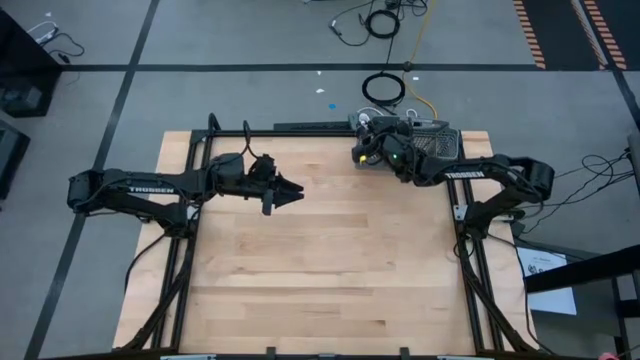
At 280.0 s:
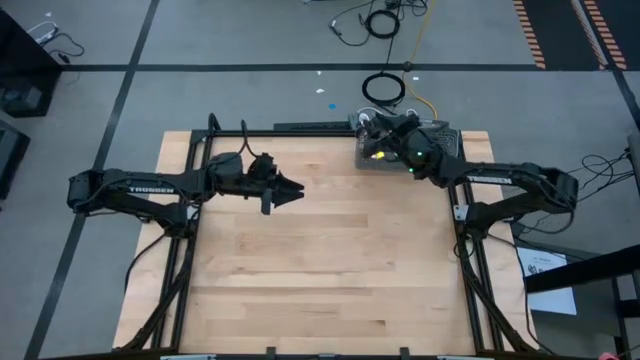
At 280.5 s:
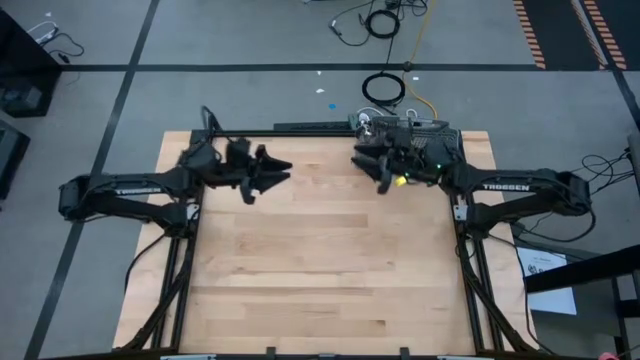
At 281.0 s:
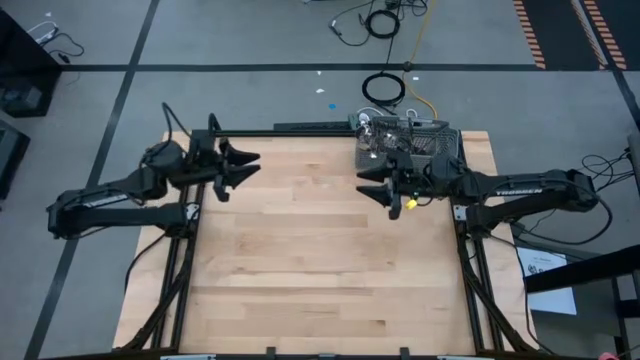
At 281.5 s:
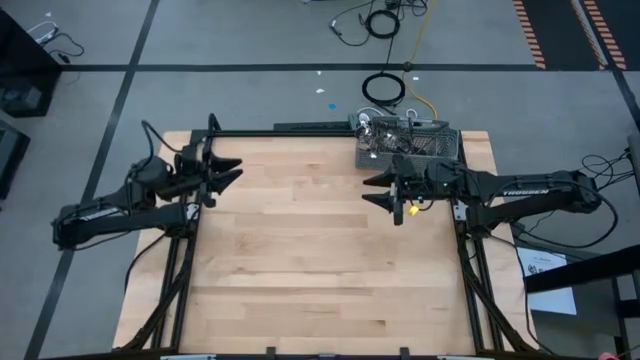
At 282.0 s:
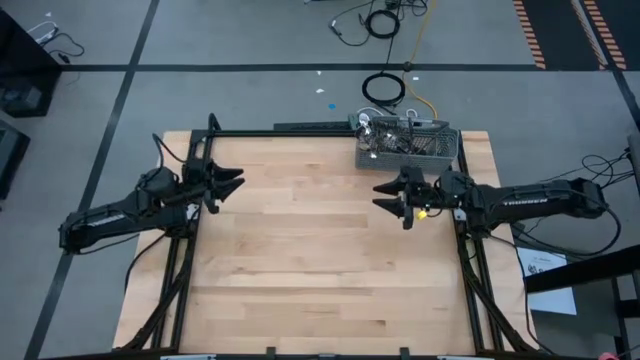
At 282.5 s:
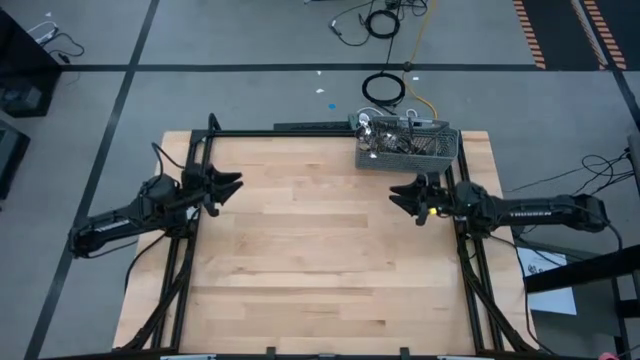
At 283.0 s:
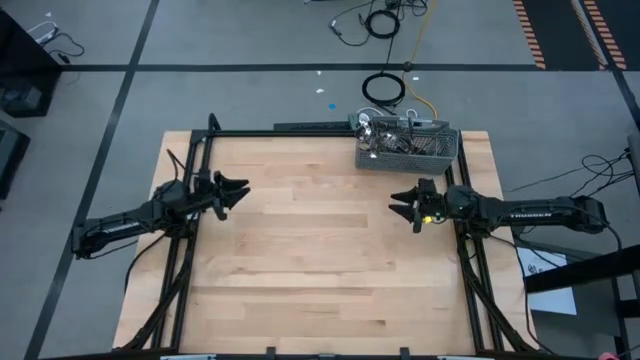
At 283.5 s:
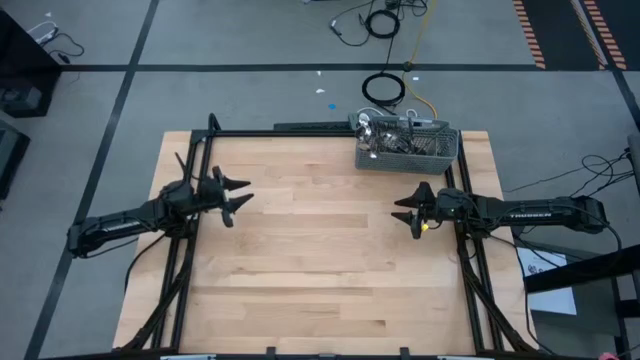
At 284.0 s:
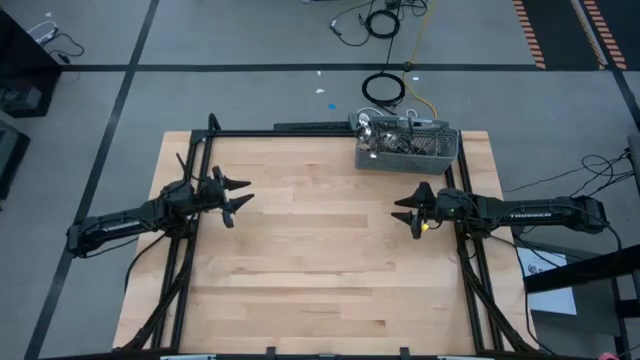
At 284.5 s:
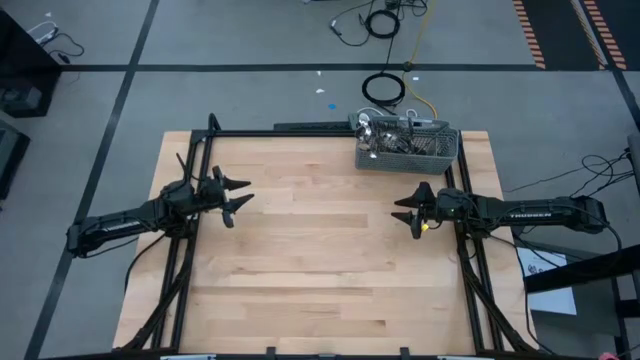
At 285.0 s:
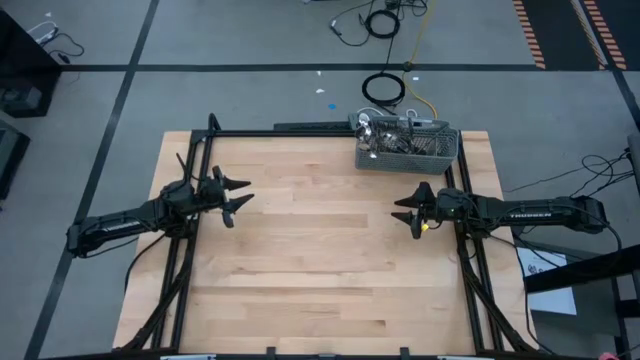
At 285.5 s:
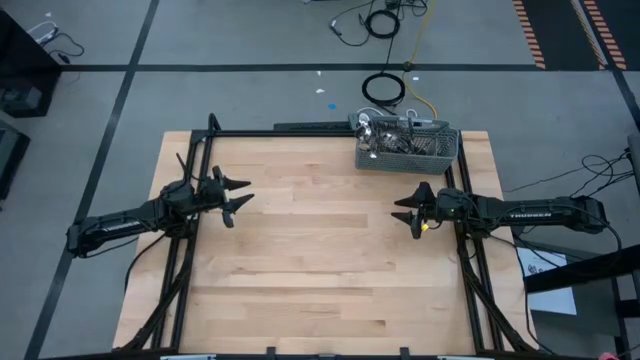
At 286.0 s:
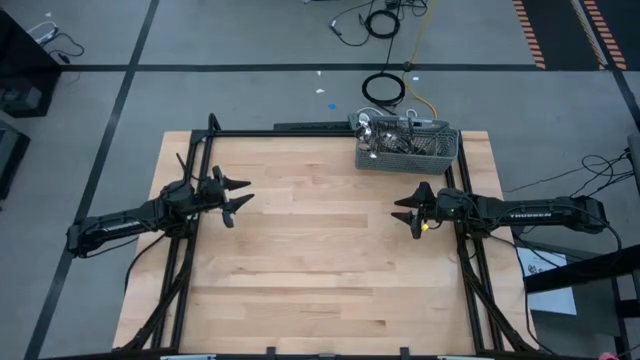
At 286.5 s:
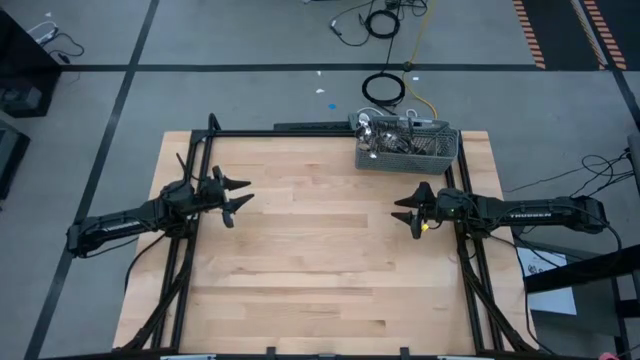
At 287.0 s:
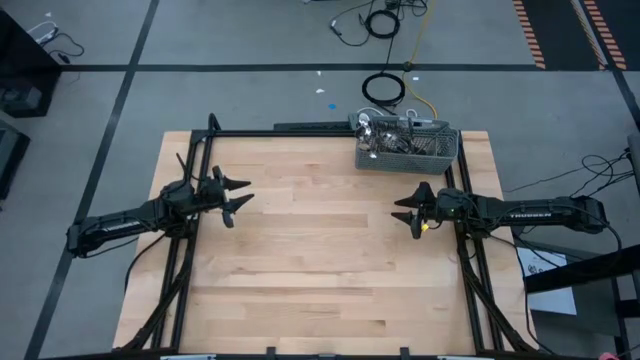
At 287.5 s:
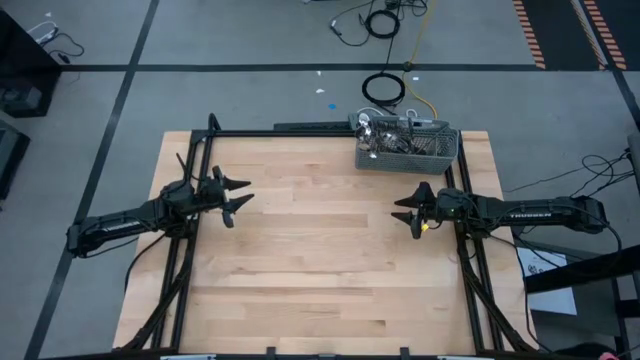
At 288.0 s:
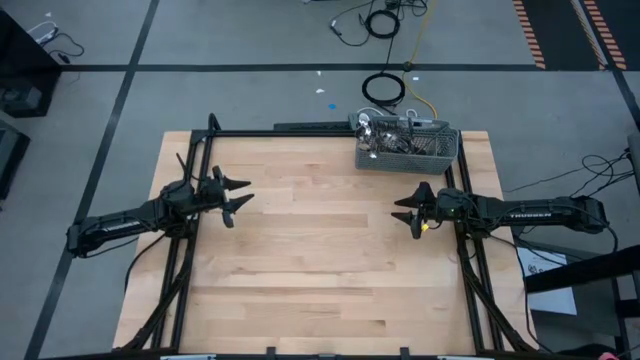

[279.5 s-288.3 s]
Task: Sort silverware
Return to Home Position

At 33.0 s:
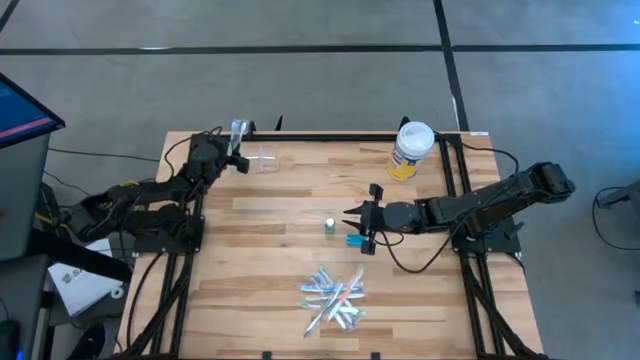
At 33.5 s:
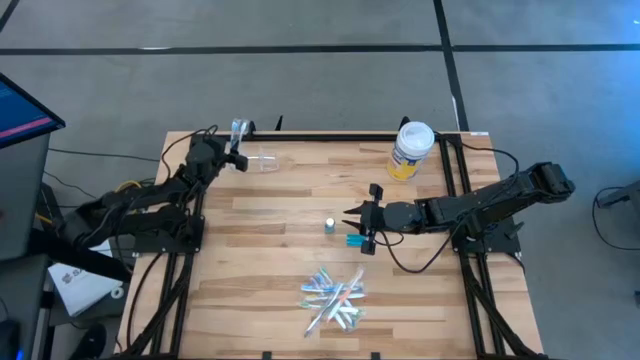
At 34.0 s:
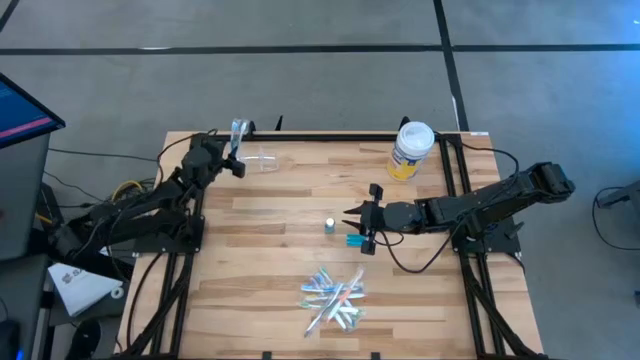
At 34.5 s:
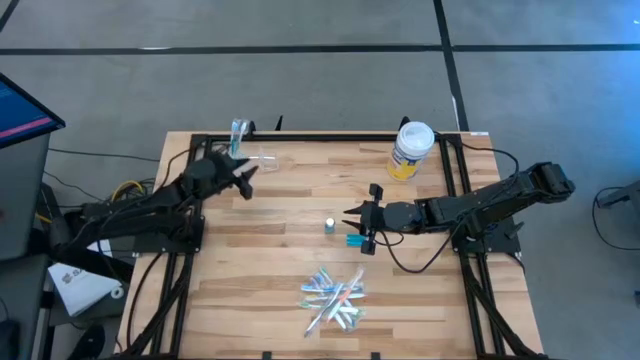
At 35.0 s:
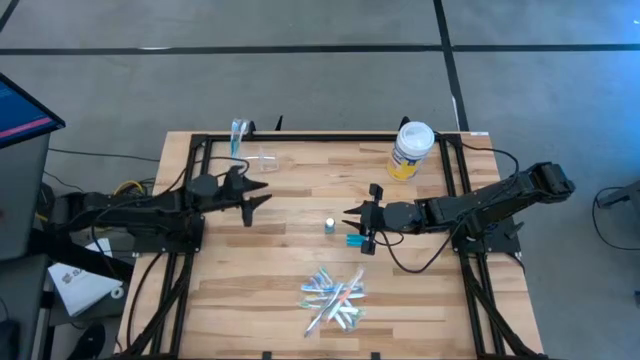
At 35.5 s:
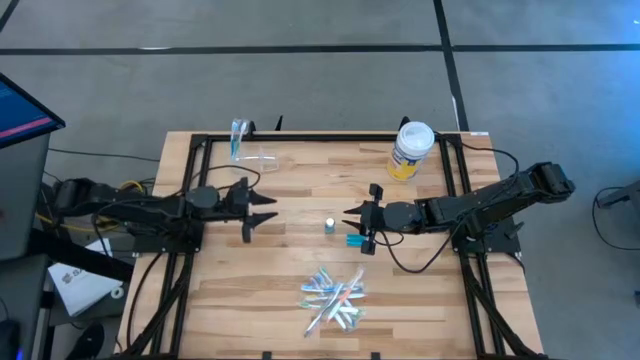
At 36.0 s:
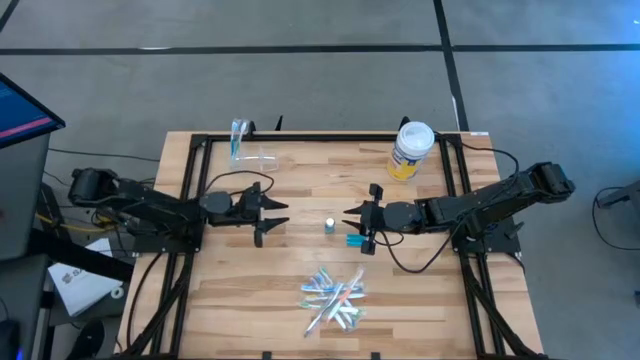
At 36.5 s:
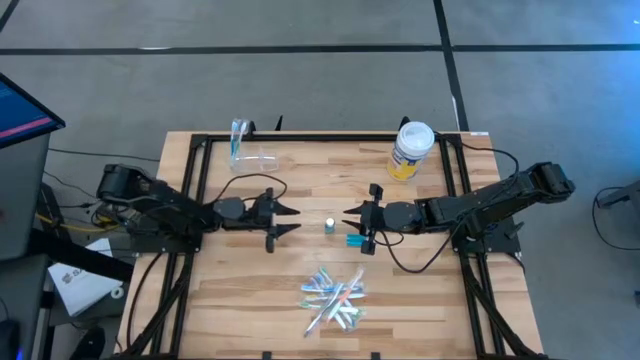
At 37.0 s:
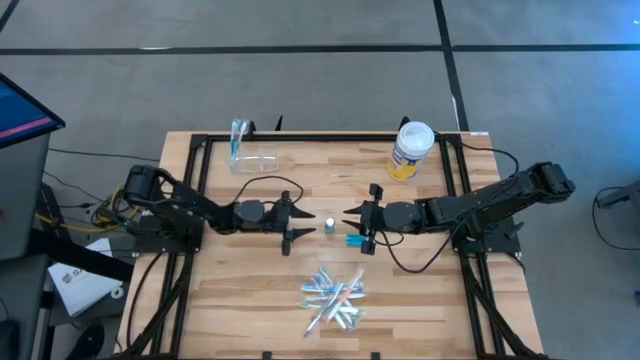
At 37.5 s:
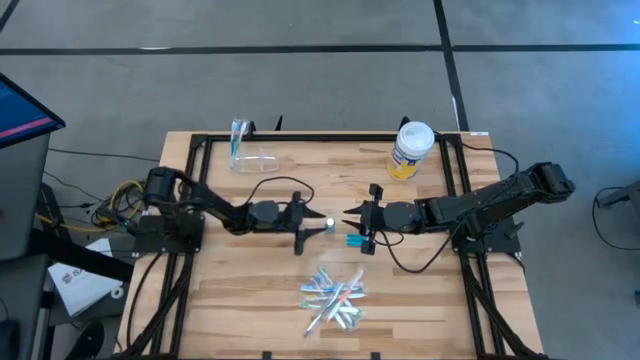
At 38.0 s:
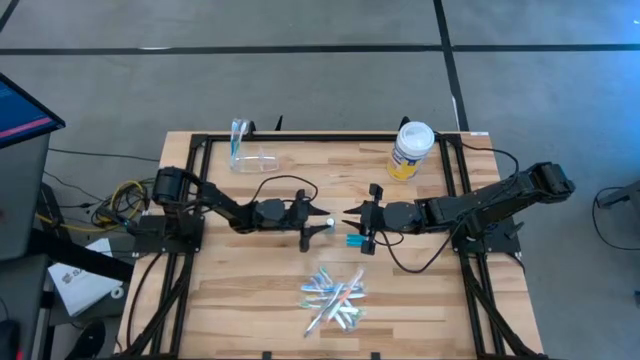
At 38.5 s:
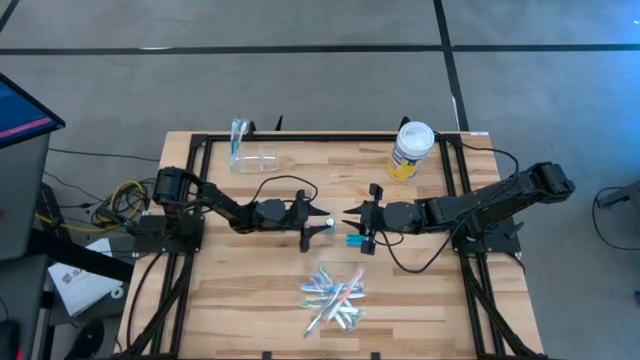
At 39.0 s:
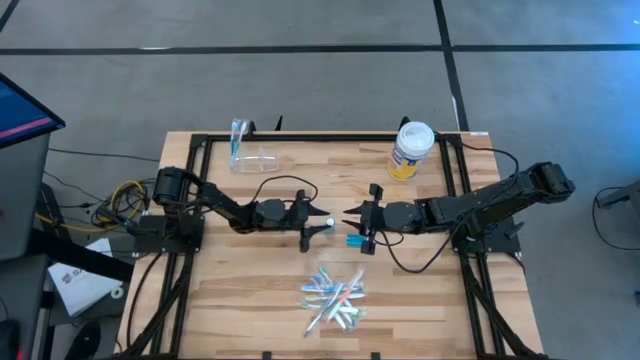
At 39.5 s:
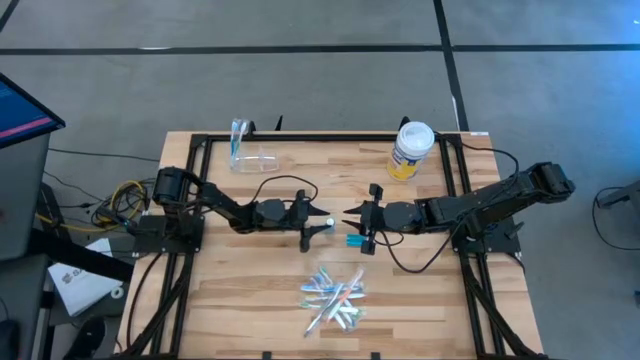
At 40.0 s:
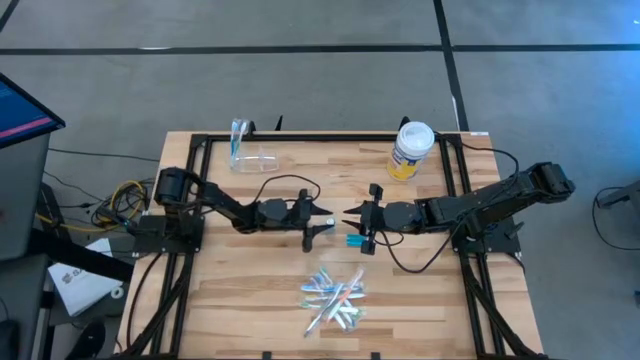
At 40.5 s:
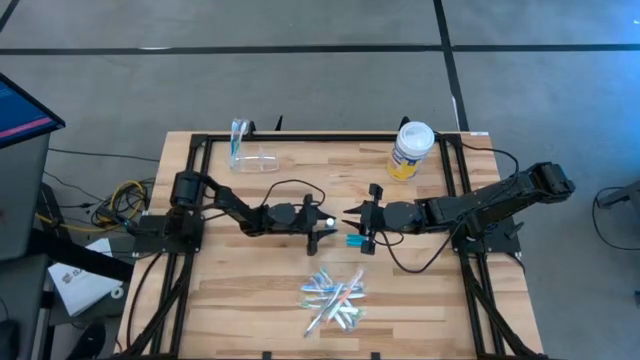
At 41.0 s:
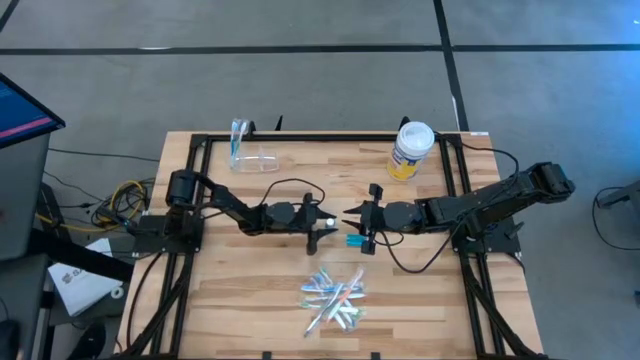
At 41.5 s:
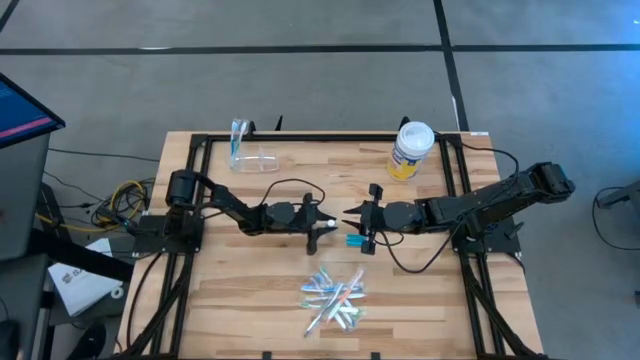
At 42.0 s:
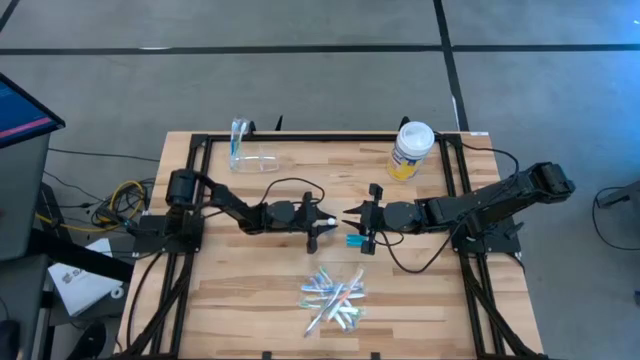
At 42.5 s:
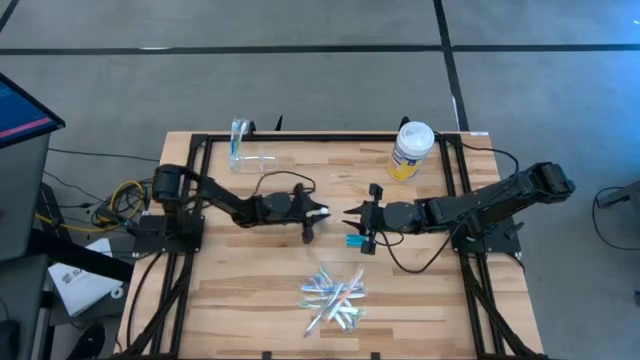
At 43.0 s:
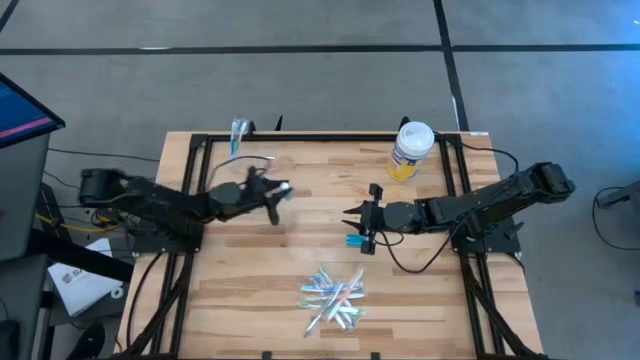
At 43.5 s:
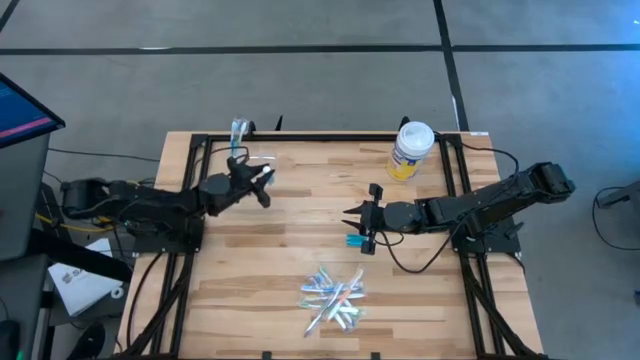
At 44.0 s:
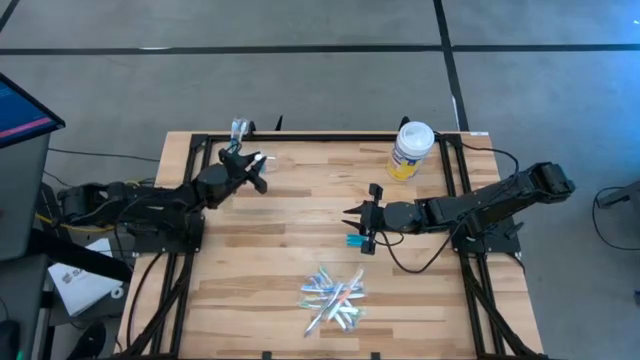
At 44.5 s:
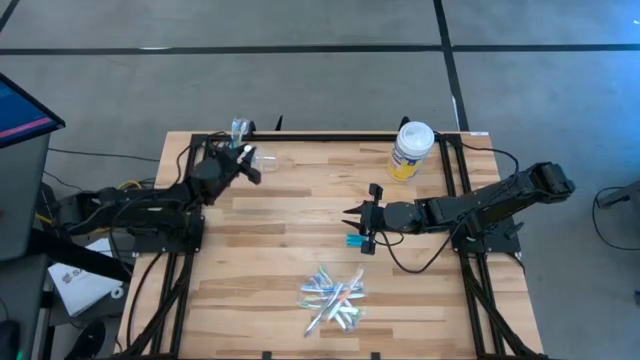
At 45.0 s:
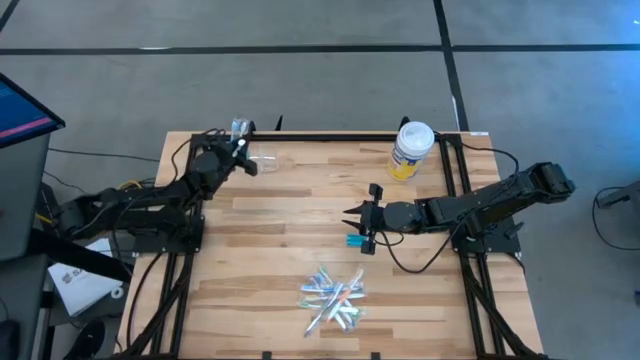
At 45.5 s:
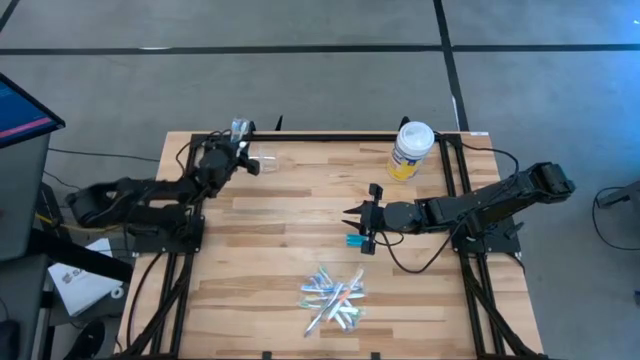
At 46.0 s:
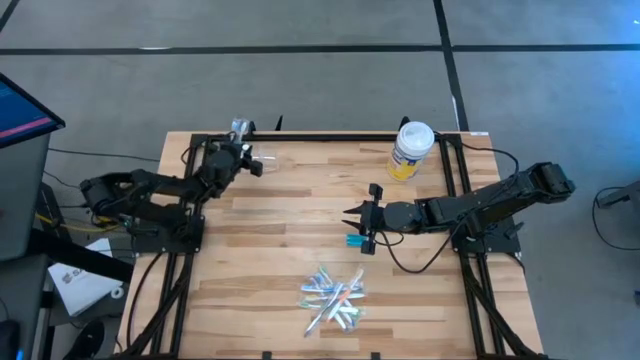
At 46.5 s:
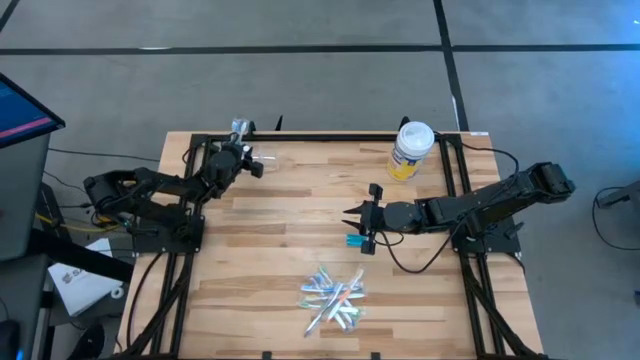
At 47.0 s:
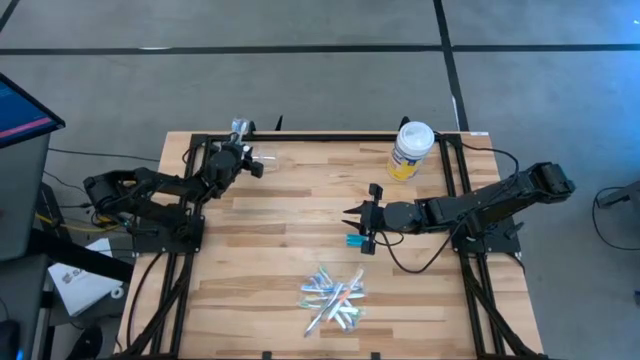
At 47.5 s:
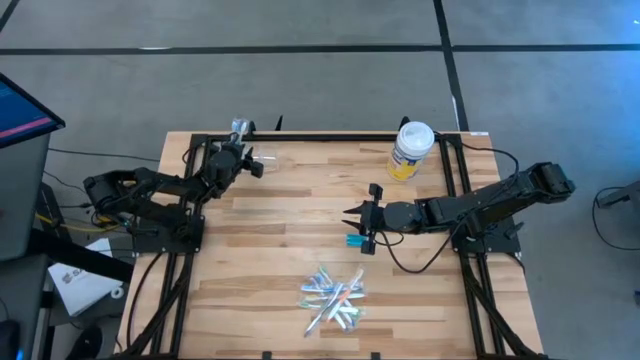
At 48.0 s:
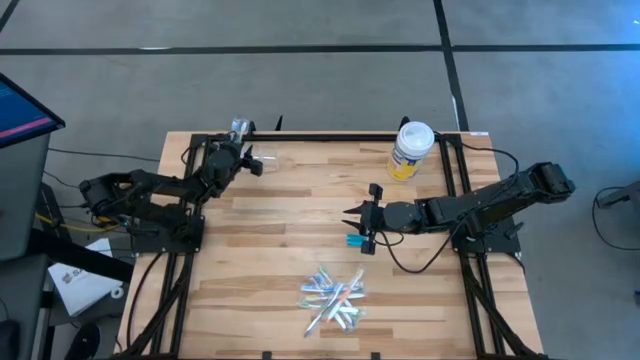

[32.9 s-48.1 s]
Task: Pick & Place toothbrushing station
Put the blue mouthwash into the transparent organizer
